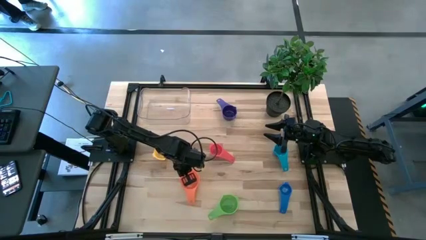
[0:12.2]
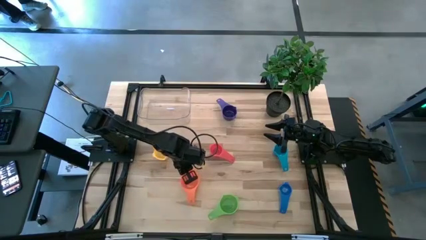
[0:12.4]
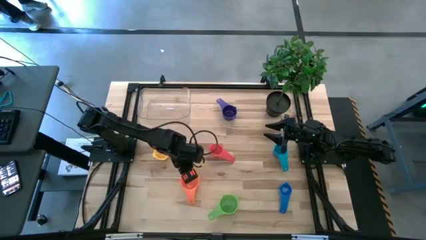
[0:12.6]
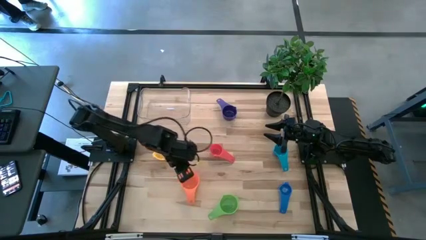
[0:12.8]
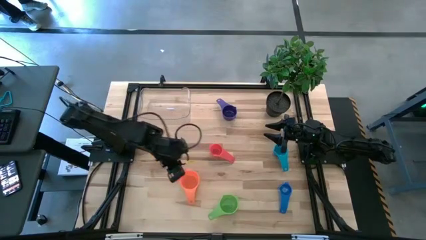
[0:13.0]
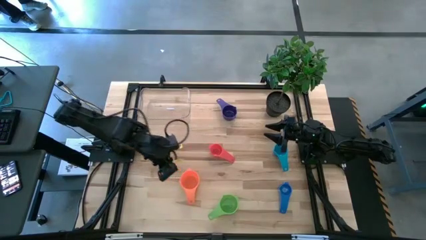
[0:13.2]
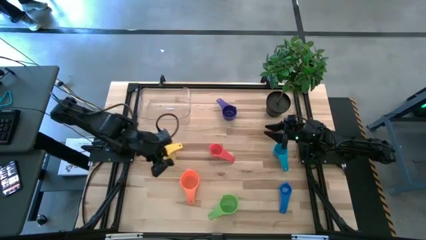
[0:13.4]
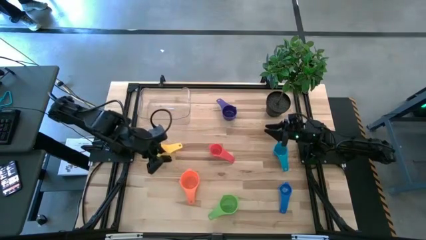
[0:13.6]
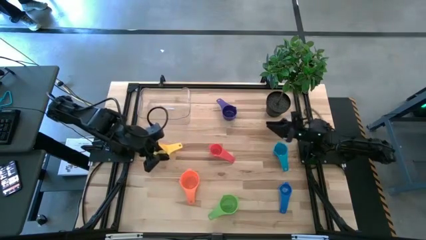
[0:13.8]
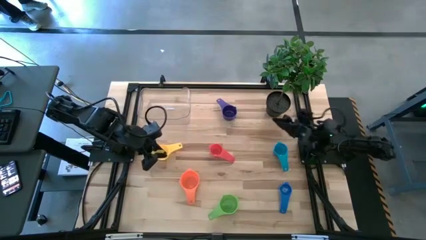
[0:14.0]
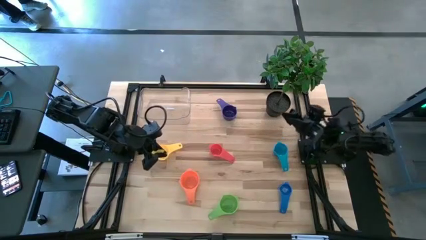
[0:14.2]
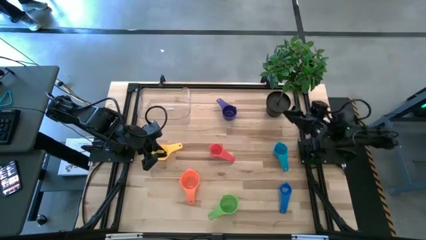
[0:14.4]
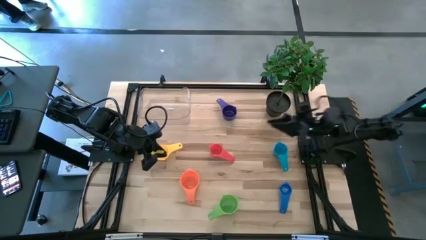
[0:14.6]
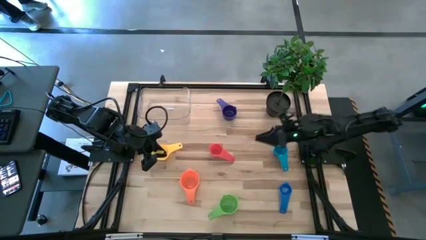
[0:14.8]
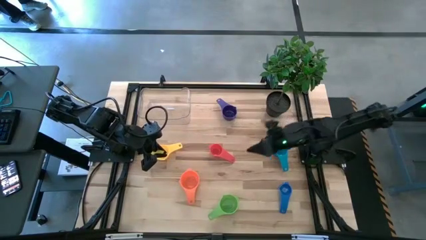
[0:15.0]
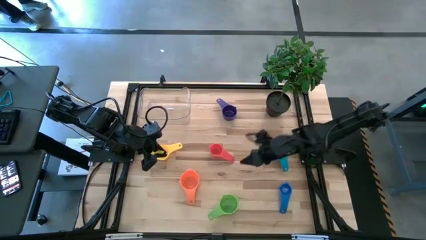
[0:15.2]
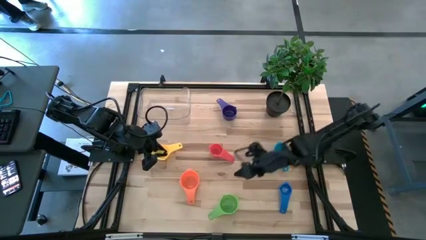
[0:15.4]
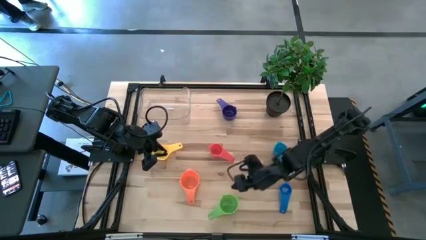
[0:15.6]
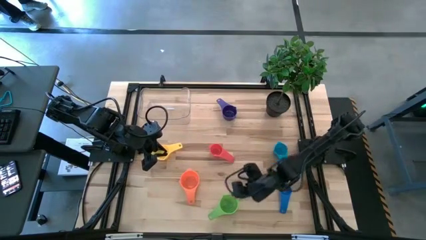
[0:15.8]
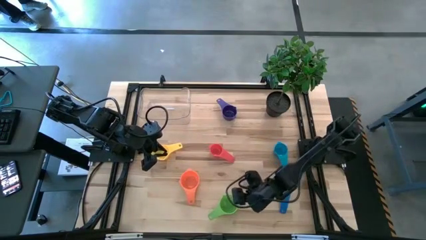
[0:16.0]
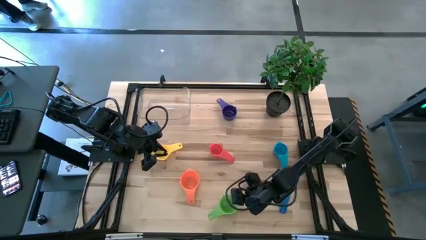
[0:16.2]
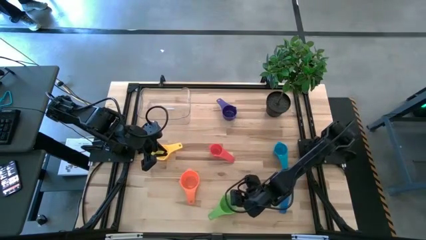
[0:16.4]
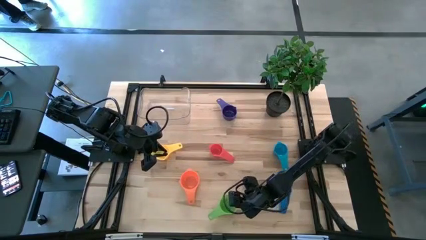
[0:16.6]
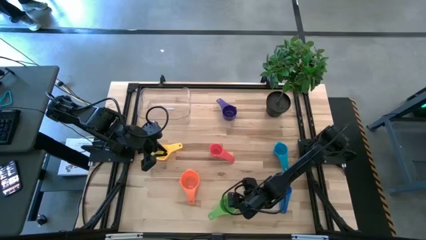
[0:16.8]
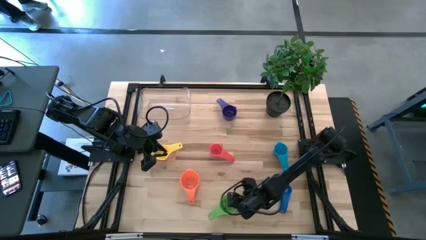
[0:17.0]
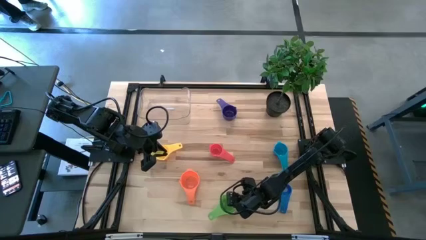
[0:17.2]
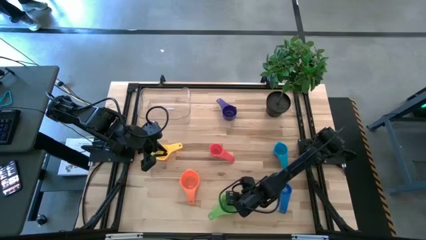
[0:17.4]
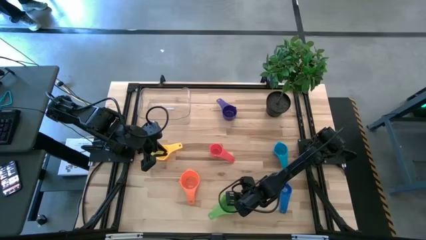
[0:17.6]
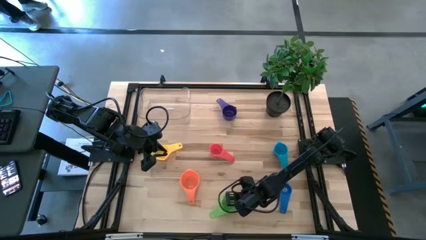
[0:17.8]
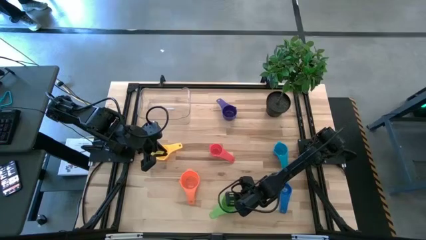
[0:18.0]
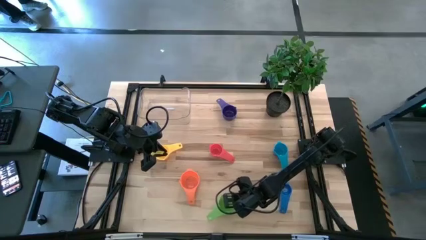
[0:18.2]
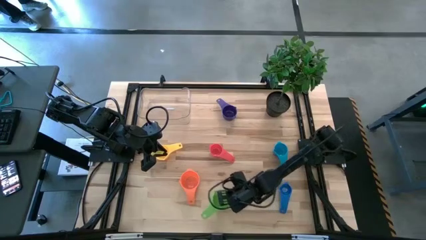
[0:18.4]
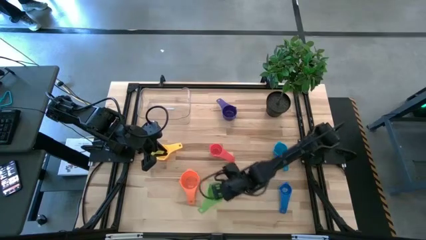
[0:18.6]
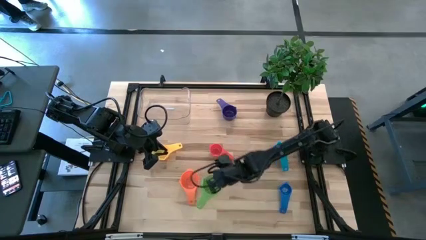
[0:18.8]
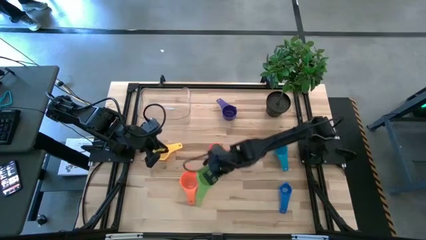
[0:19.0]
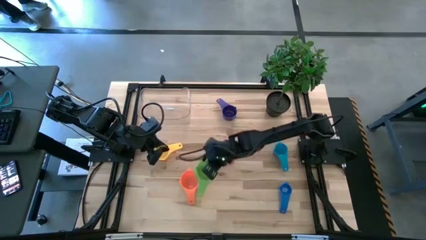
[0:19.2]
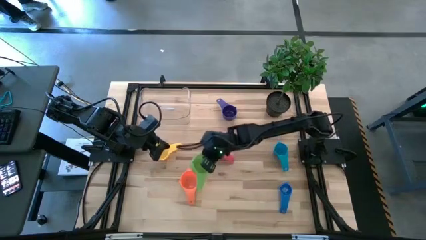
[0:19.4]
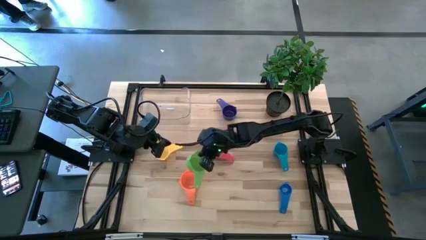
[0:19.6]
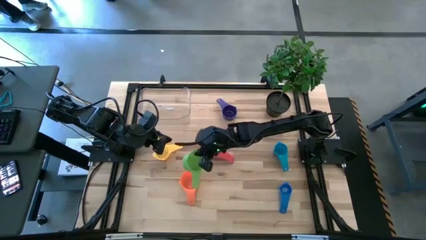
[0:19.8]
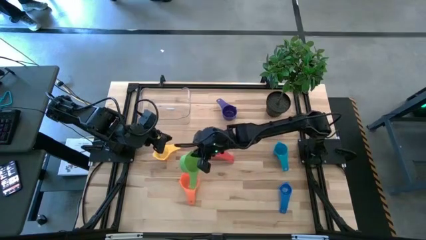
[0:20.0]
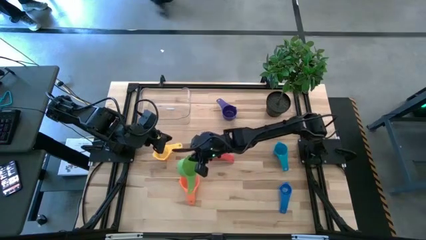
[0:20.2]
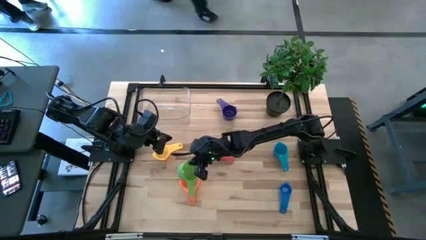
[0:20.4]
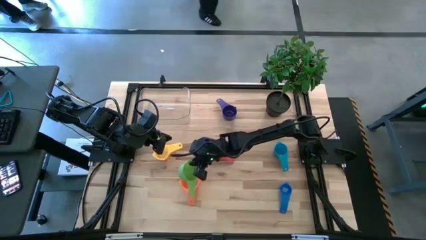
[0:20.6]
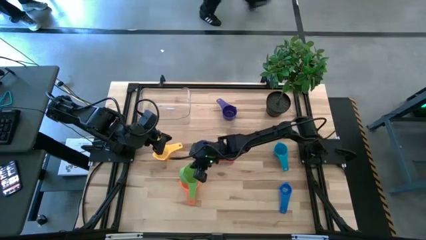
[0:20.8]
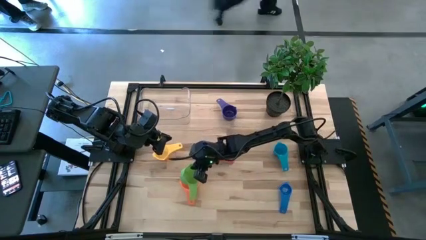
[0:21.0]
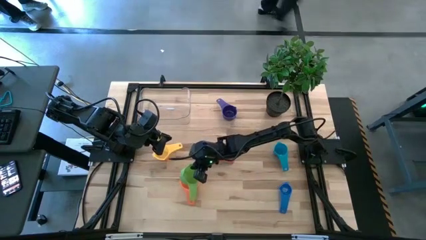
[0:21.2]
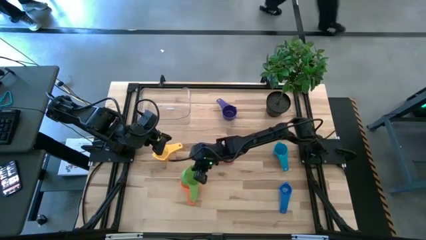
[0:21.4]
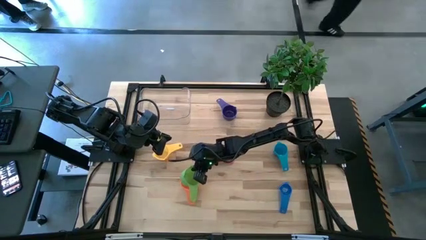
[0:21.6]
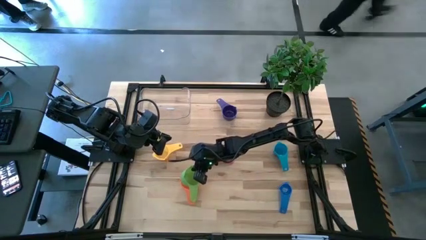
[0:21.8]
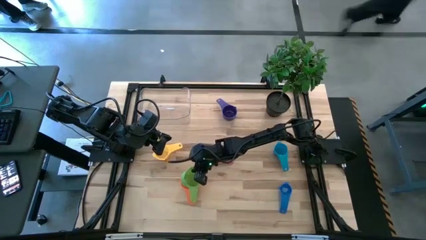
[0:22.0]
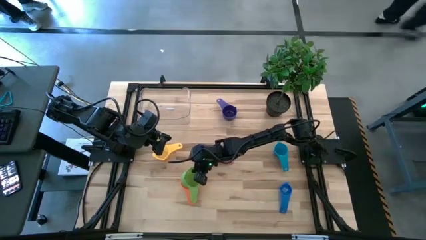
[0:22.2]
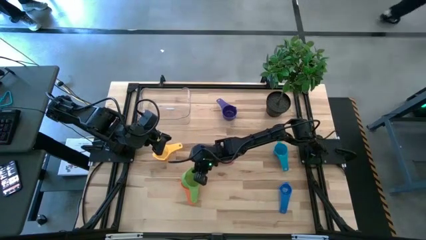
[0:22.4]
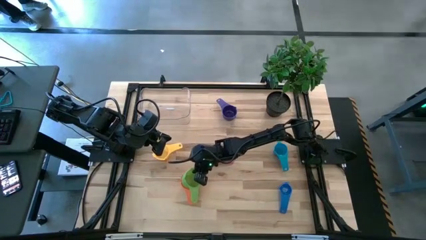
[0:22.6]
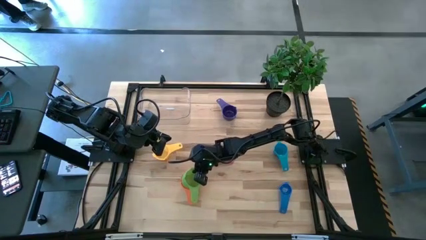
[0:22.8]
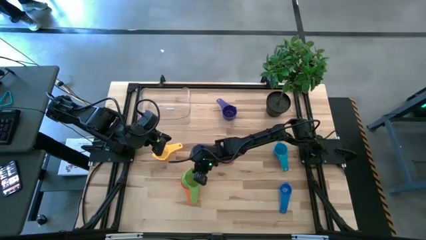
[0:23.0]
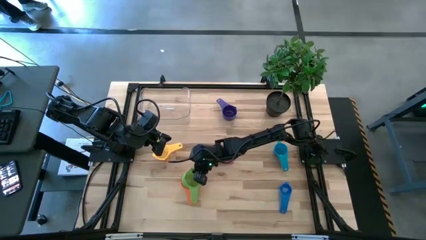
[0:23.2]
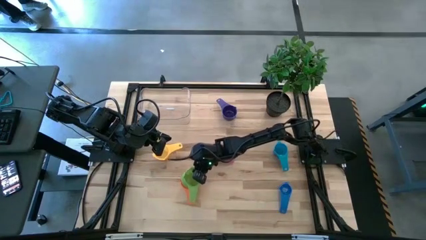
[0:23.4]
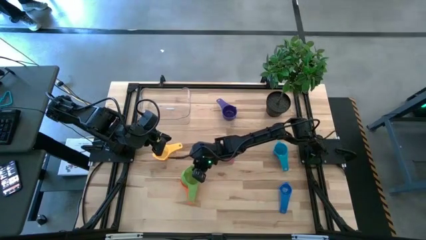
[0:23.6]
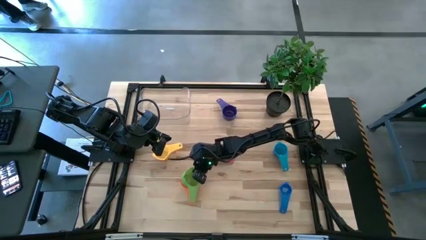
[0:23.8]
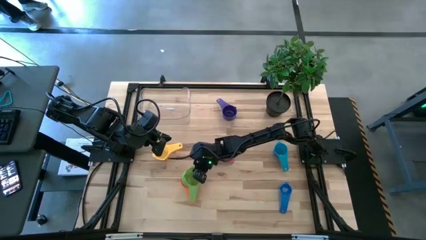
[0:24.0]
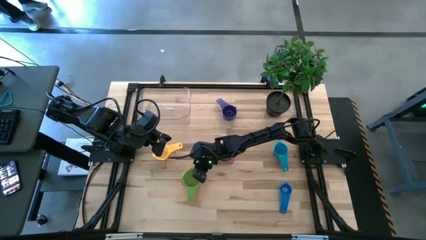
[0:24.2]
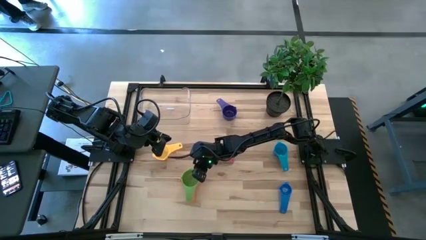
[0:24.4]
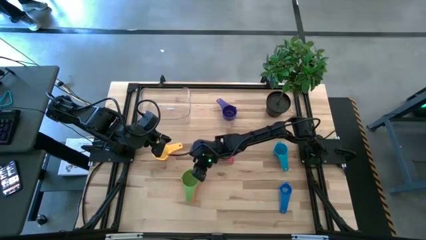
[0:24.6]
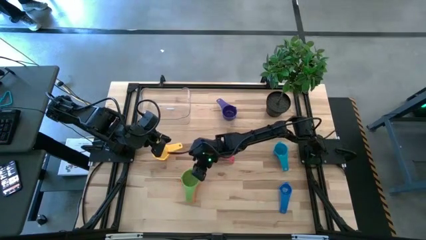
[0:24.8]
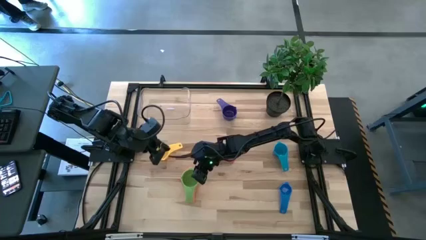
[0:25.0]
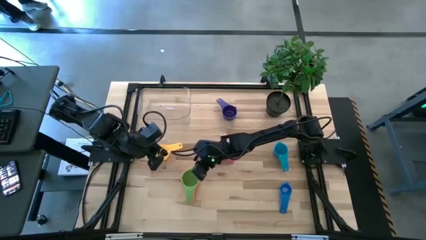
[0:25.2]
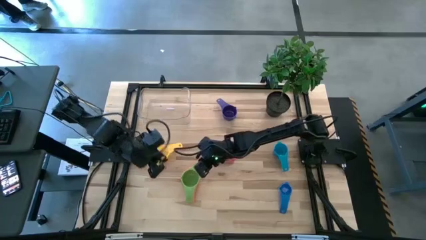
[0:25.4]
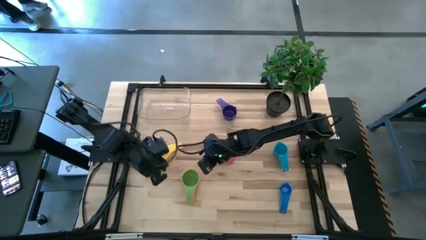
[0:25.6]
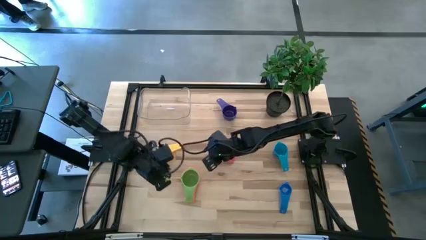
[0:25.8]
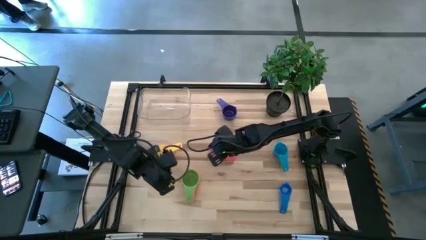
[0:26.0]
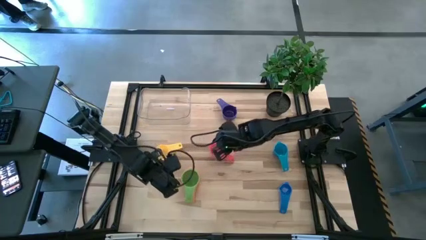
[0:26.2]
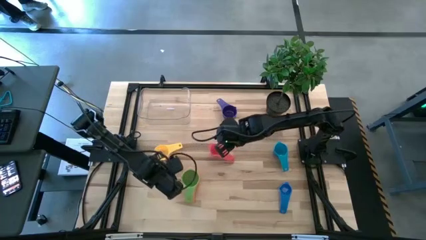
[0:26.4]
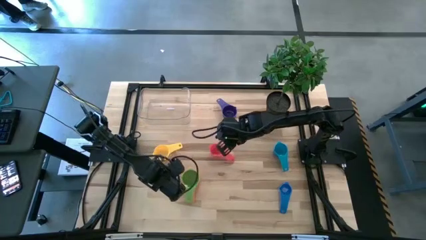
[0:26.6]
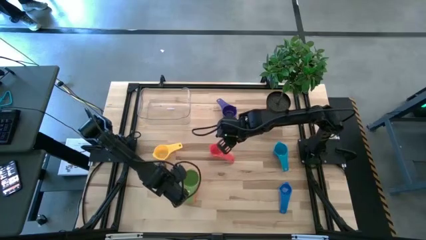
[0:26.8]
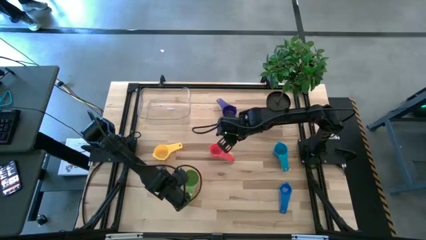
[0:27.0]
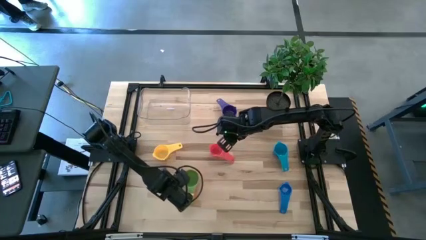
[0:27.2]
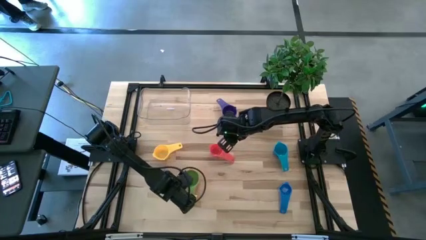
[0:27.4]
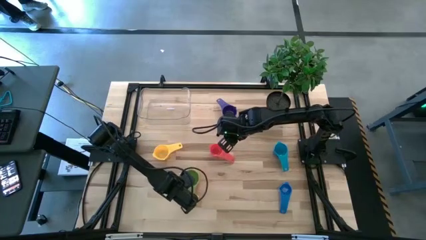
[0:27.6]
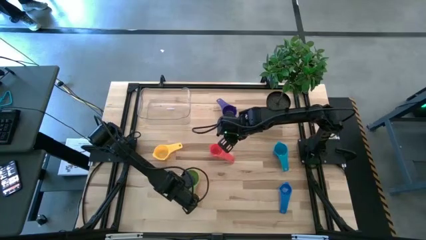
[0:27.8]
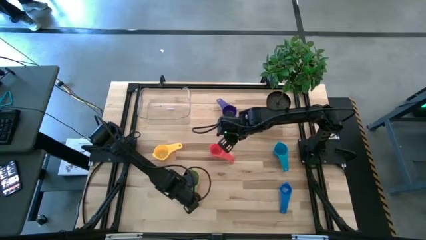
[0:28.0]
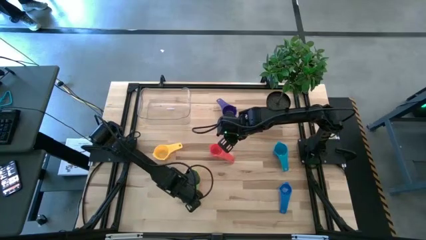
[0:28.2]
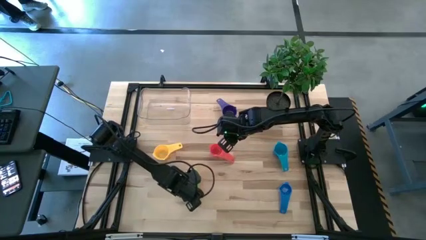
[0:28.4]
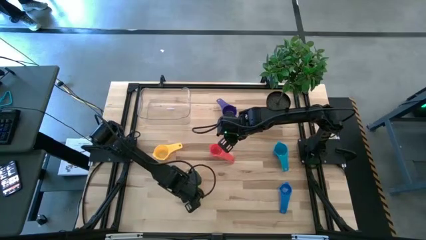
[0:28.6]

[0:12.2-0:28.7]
Task: Nest measuring cups in basket
Stack the green measuring cup on top of the orange measuring cup
